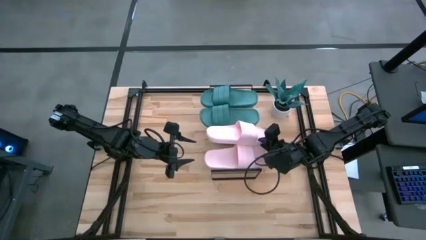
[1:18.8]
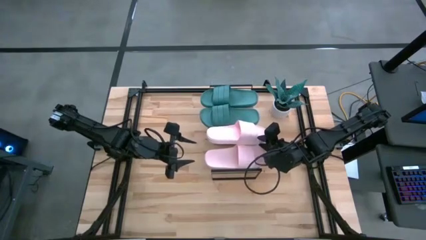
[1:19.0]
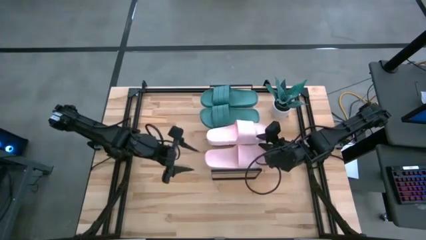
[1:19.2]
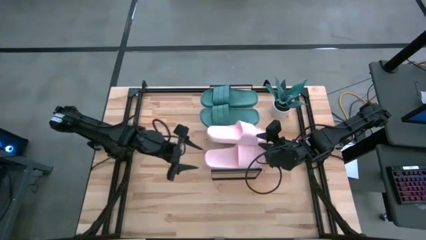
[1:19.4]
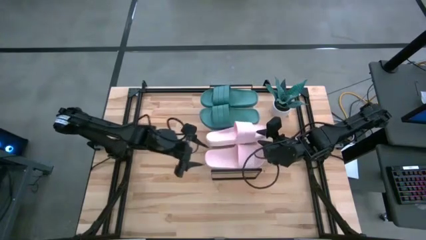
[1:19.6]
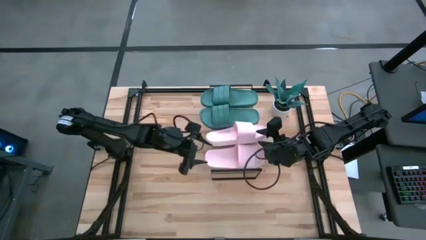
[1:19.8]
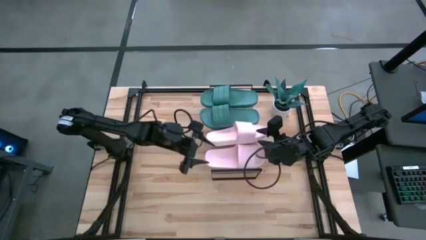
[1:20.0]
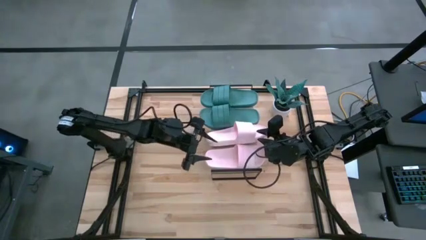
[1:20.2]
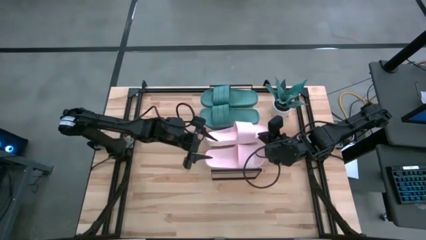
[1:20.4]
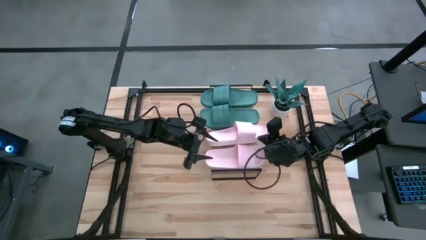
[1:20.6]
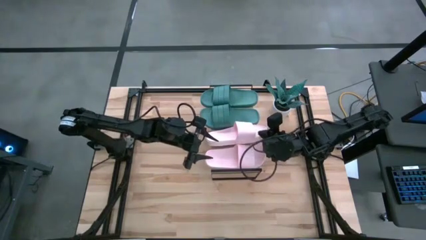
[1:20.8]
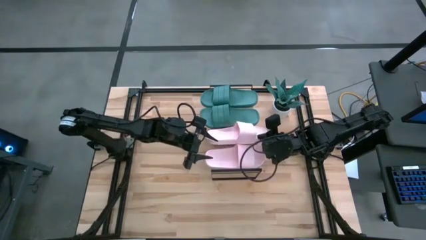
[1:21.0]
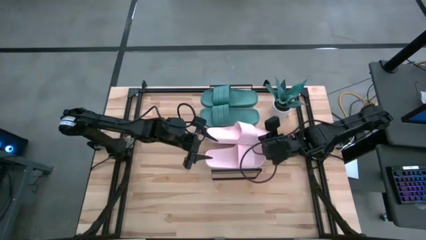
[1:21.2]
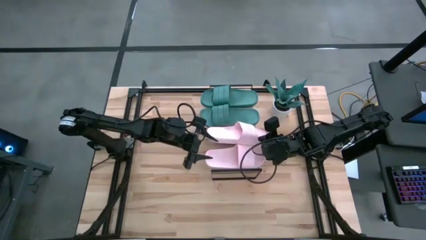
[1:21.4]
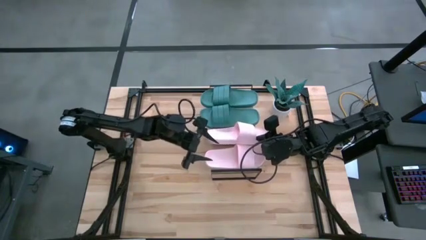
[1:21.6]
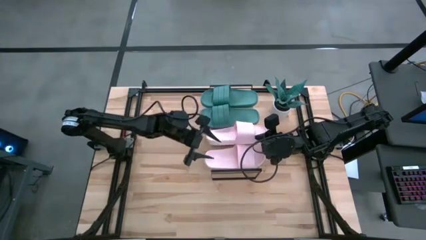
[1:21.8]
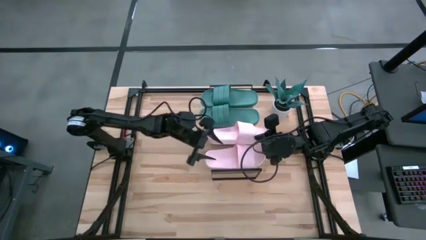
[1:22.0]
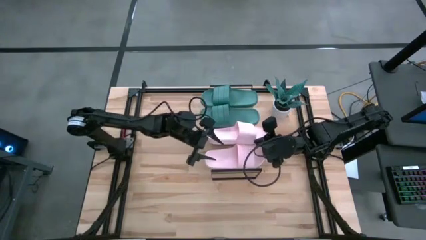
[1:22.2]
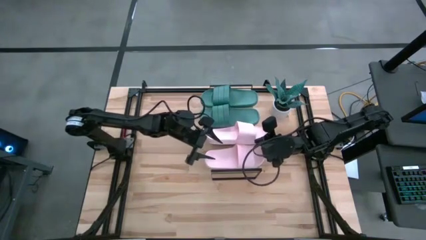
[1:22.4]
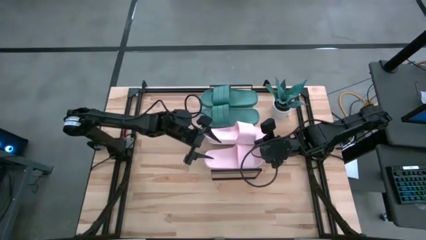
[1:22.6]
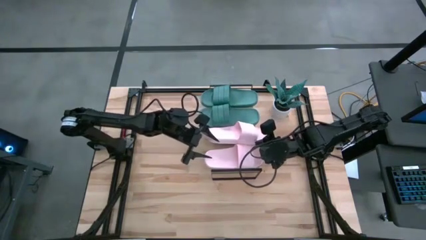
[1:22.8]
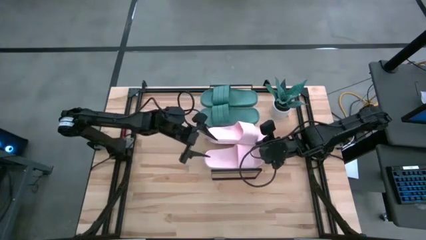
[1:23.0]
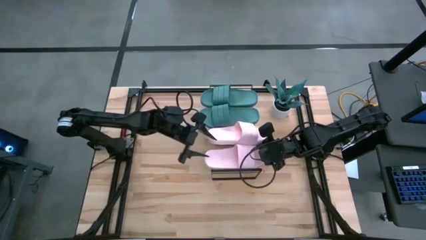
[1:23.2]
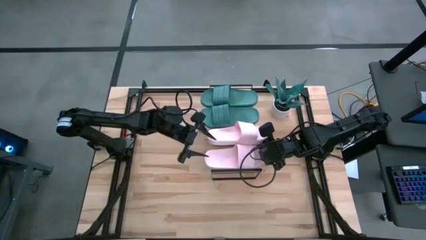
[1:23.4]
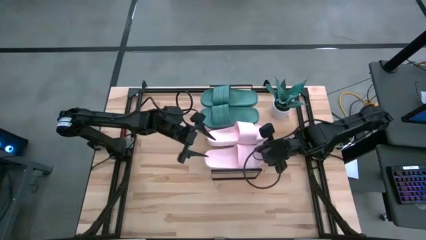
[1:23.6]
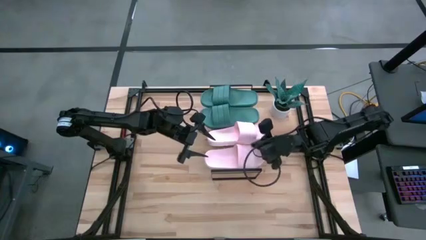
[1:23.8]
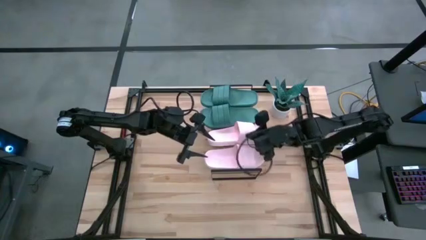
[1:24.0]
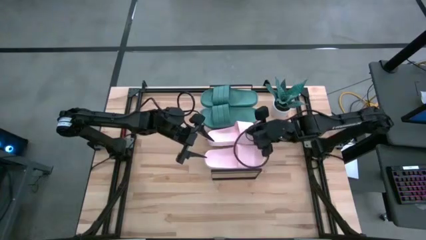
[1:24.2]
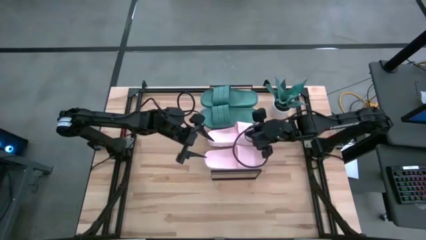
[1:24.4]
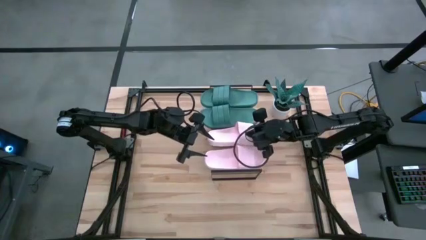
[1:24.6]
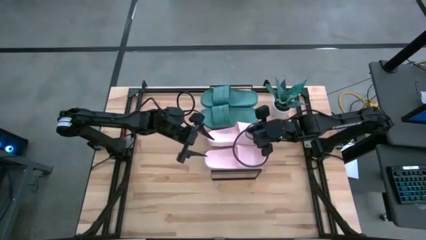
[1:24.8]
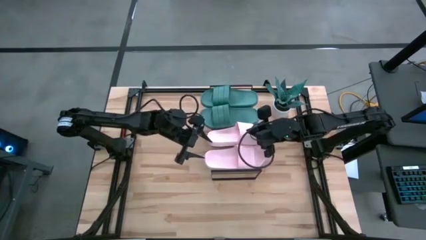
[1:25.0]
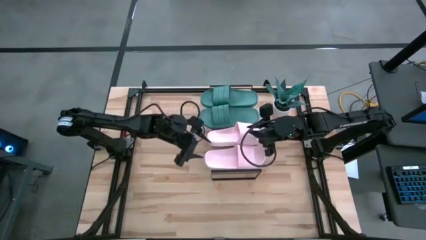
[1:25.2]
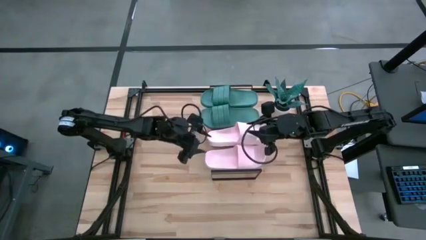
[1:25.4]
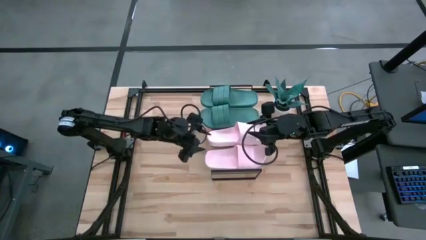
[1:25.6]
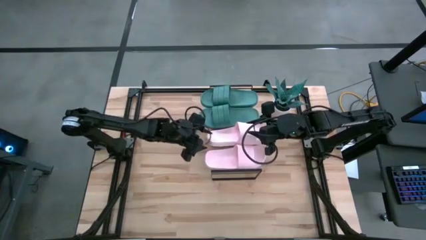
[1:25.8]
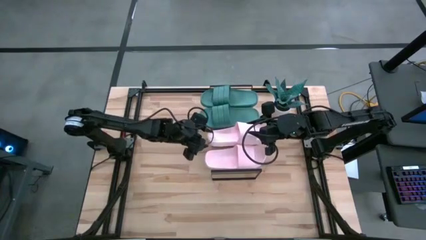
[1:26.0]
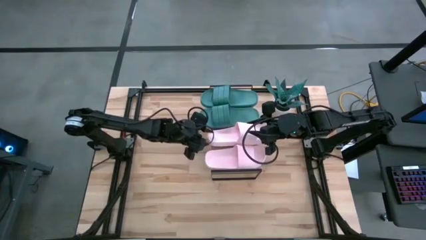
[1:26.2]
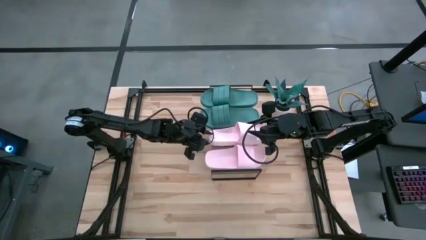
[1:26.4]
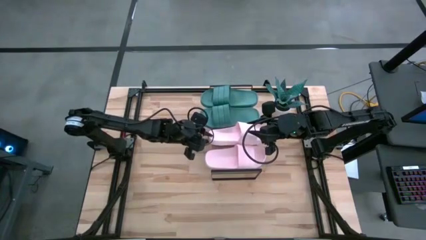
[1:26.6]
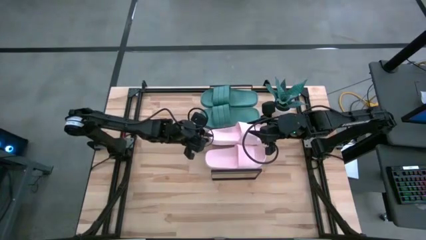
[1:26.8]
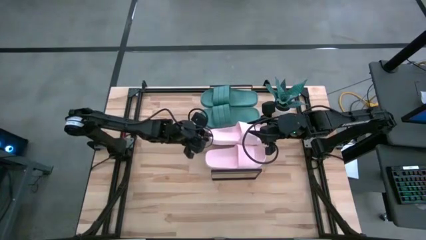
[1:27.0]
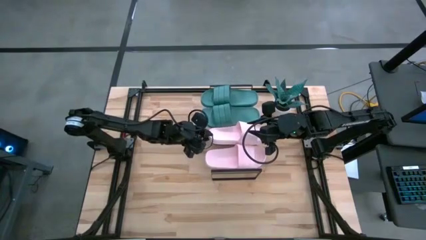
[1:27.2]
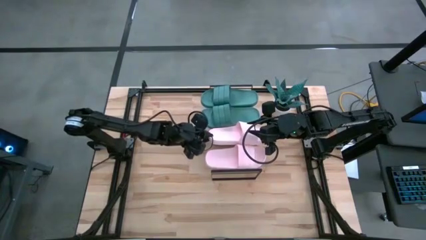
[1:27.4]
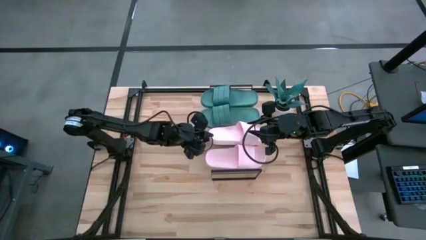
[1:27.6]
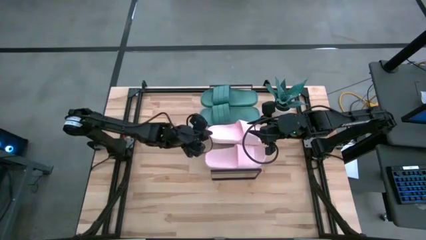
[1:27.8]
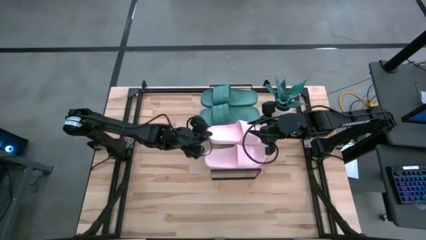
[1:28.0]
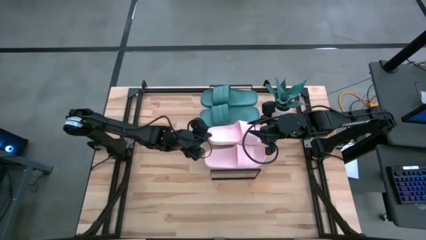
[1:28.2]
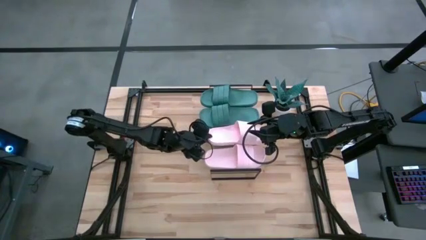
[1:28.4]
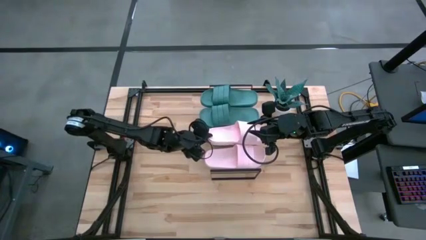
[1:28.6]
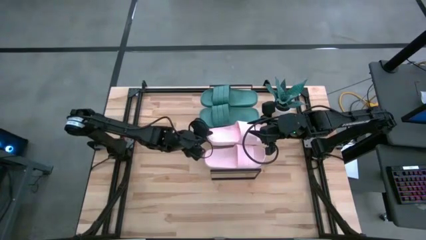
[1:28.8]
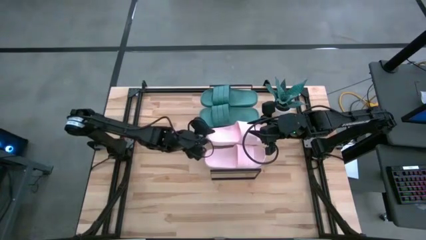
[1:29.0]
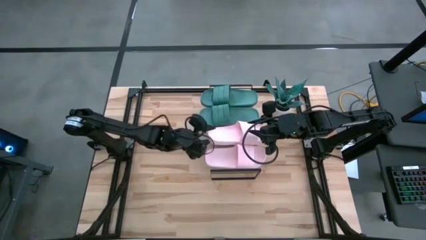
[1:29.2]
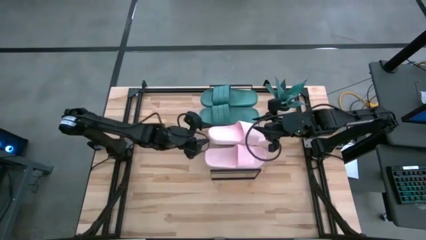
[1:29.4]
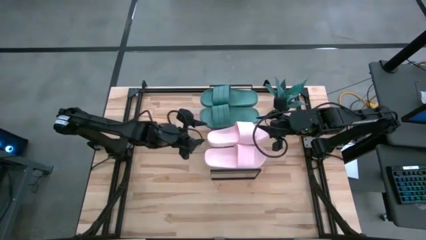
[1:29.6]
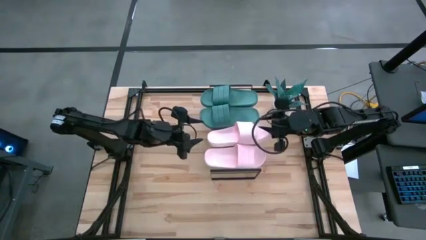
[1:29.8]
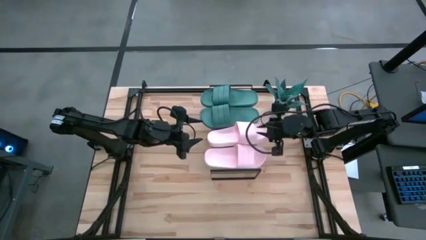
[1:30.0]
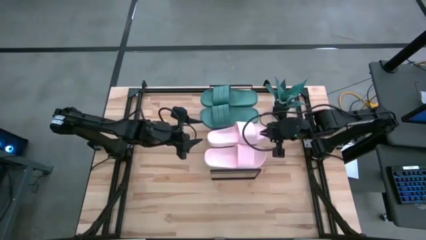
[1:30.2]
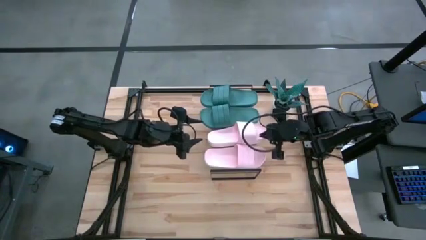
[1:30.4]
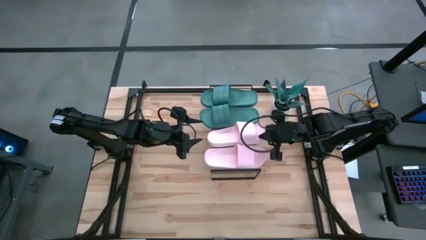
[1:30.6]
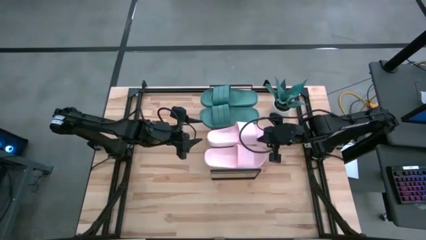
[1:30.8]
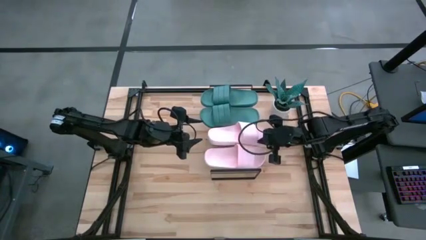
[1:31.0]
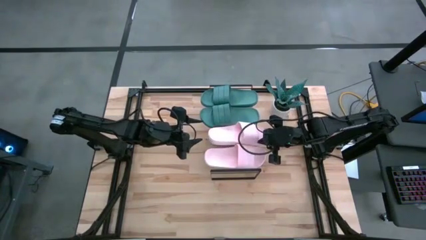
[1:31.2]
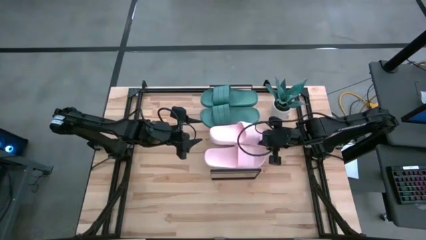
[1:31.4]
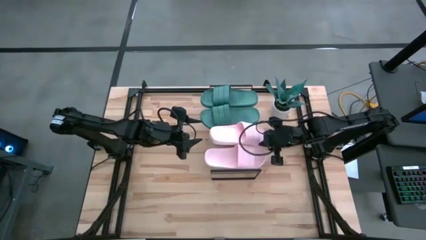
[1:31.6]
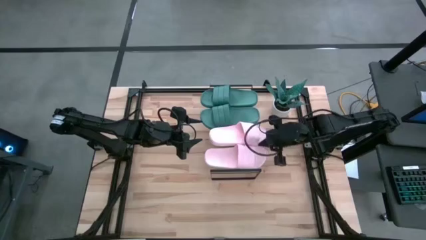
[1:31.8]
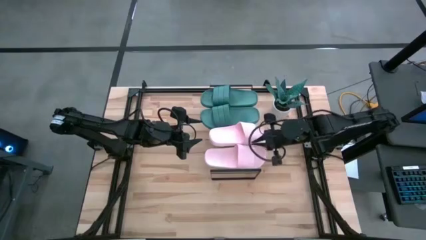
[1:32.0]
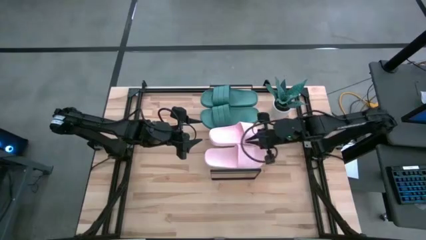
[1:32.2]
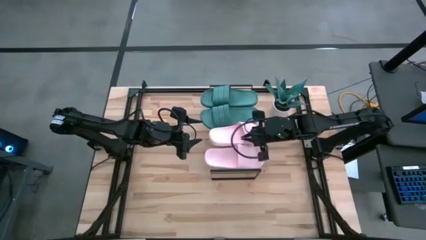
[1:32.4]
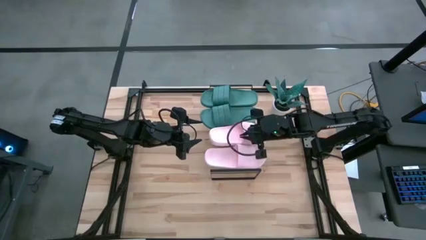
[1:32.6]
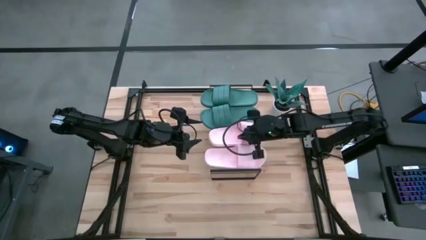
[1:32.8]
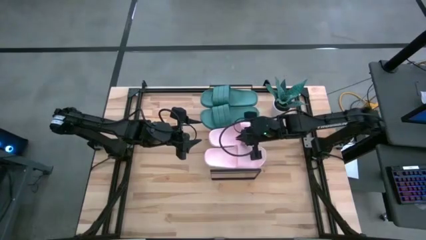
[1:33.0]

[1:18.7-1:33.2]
Task: Pick and place slides into the shelf
Put the left pink slipper on the shelf

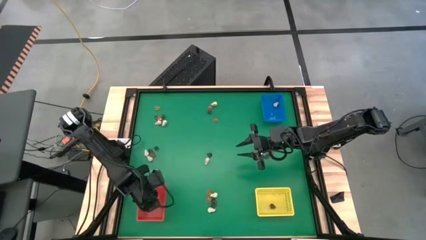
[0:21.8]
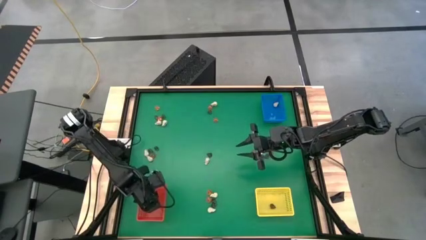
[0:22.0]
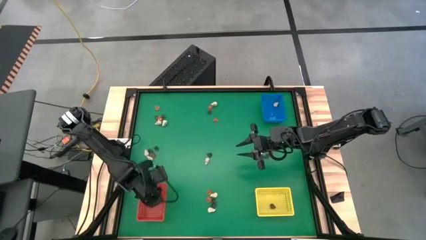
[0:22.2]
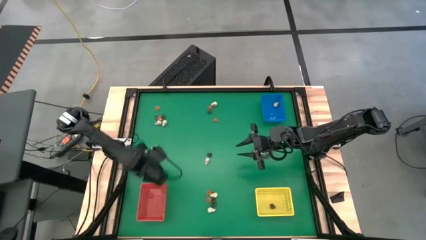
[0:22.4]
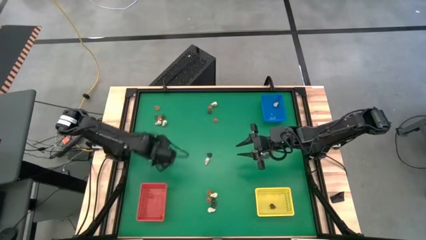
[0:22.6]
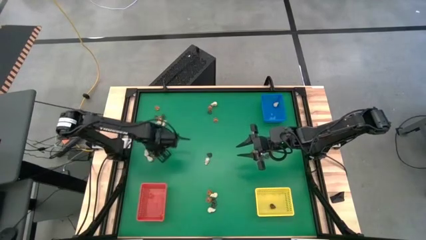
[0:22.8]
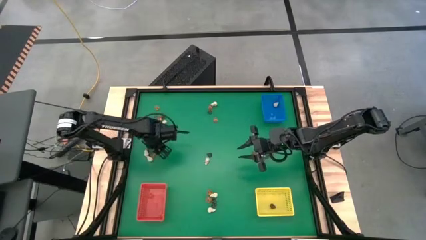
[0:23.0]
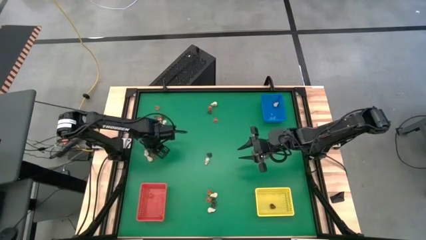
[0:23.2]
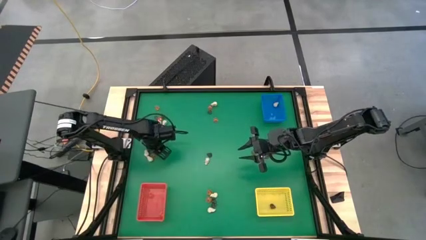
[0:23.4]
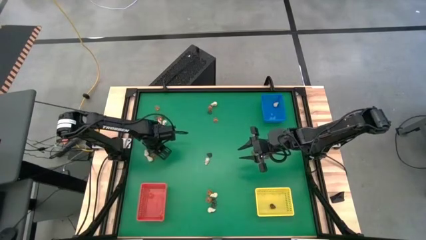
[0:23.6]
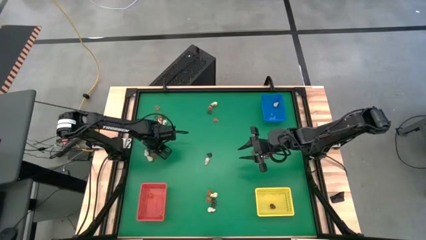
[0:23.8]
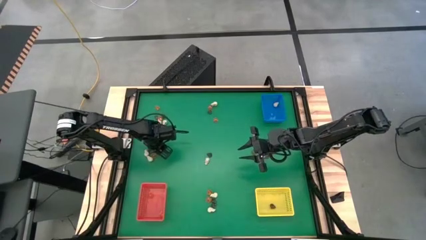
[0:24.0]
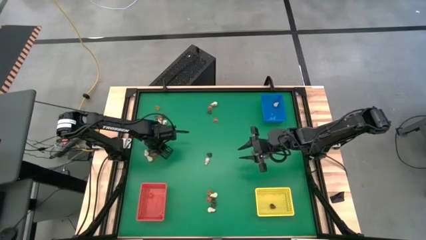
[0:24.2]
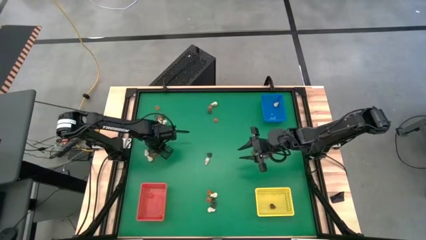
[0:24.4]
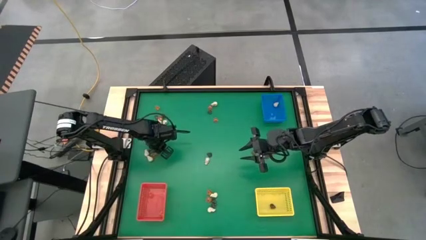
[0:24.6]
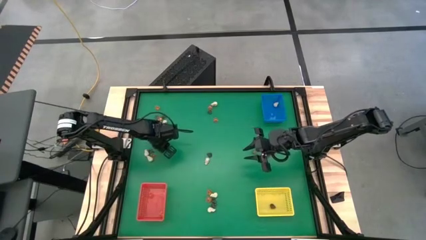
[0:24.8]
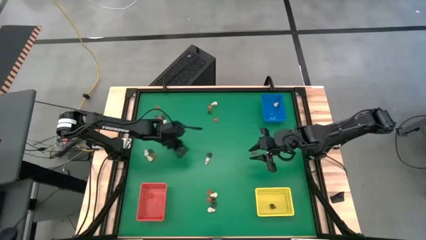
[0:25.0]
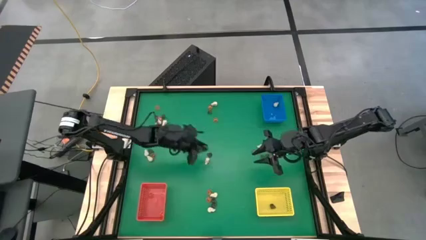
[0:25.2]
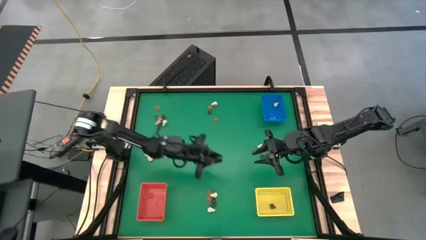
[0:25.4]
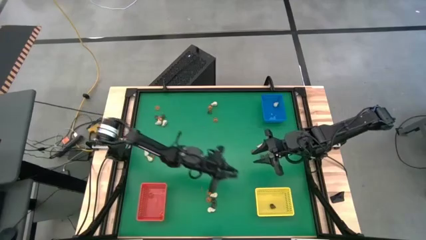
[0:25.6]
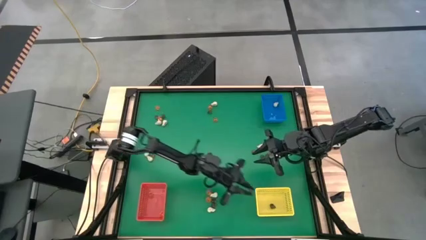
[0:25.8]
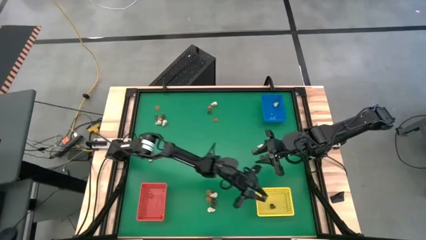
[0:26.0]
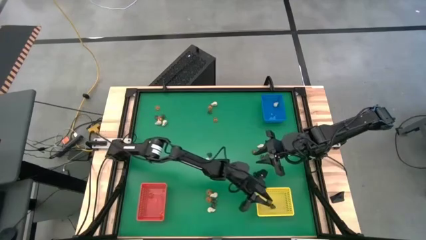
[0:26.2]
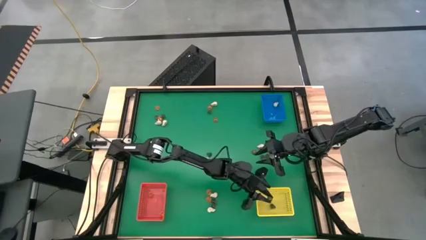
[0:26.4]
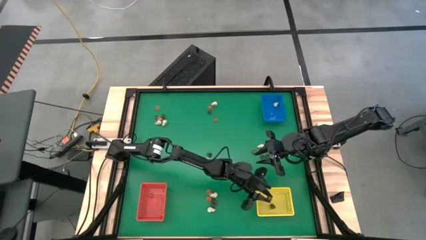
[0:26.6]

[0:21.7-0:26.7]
Task: Sort Halloween decoration
Put the black skull toy into the yellow bin
